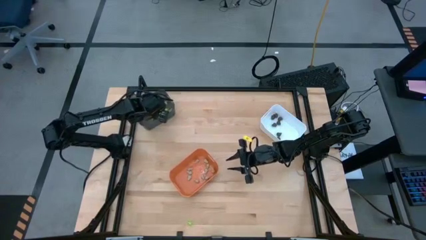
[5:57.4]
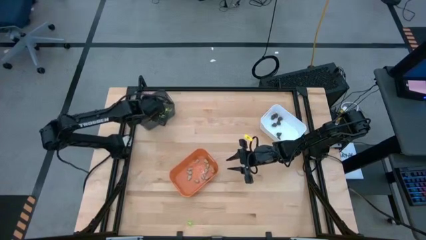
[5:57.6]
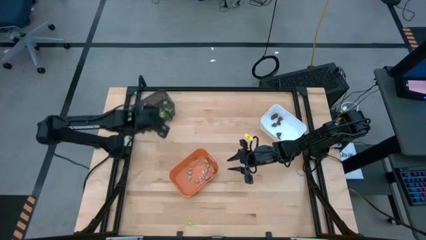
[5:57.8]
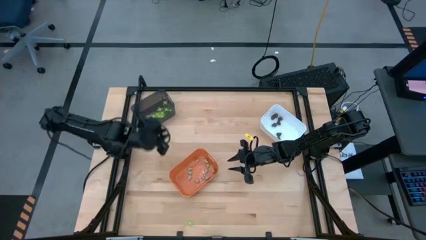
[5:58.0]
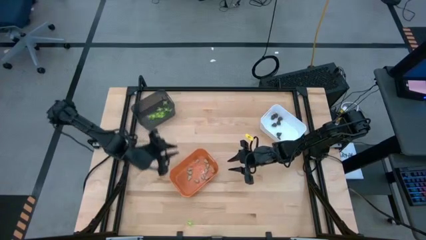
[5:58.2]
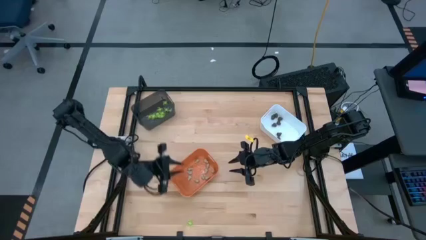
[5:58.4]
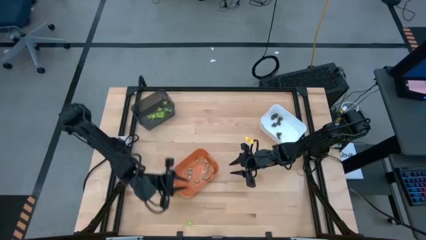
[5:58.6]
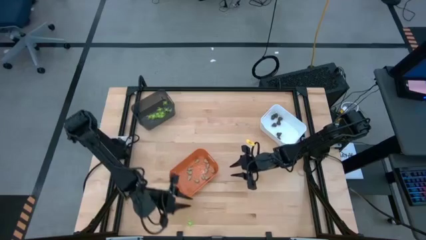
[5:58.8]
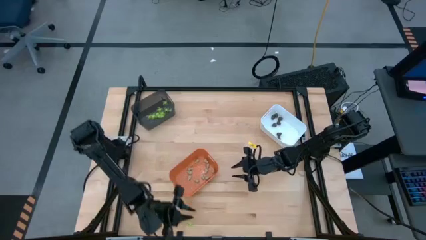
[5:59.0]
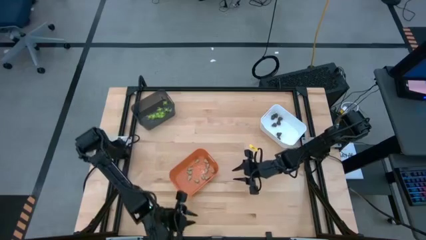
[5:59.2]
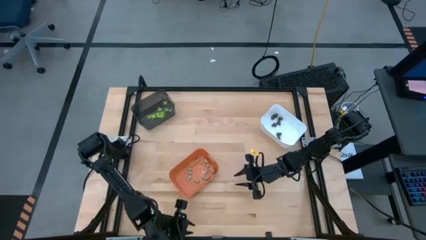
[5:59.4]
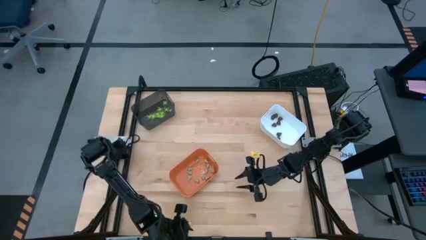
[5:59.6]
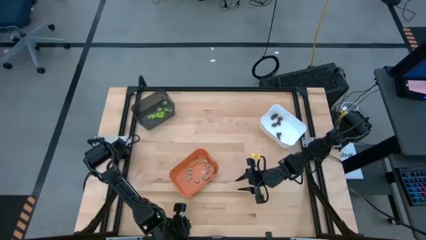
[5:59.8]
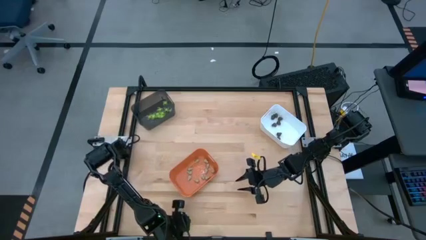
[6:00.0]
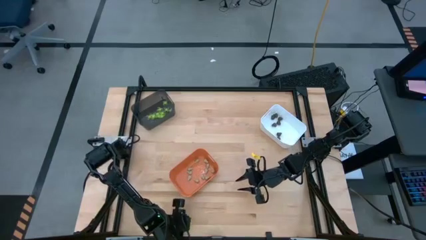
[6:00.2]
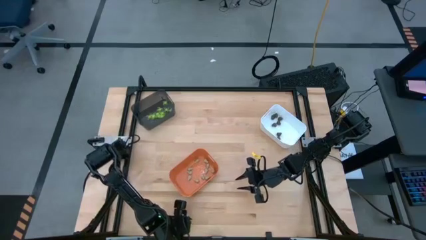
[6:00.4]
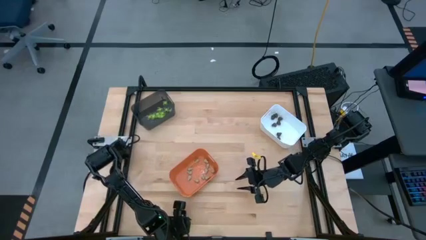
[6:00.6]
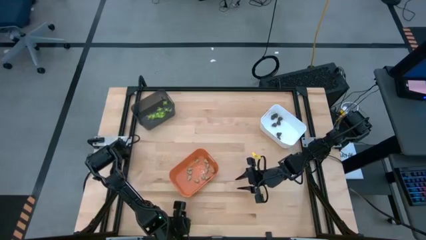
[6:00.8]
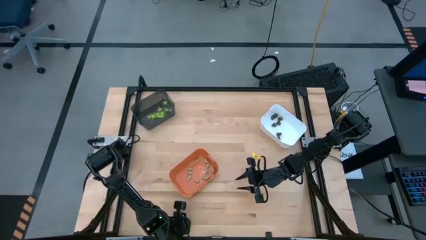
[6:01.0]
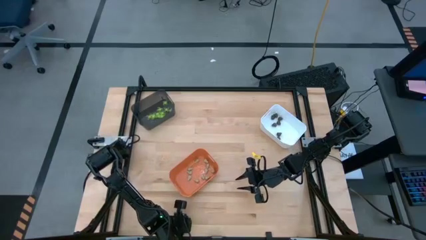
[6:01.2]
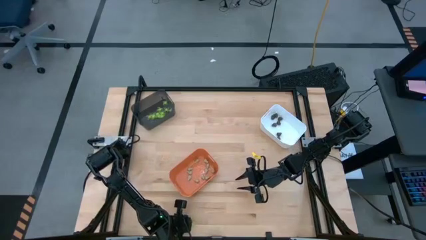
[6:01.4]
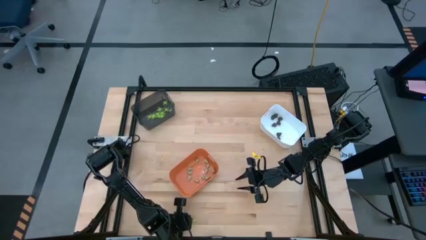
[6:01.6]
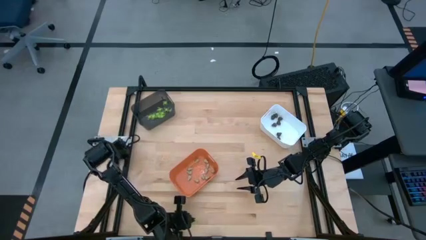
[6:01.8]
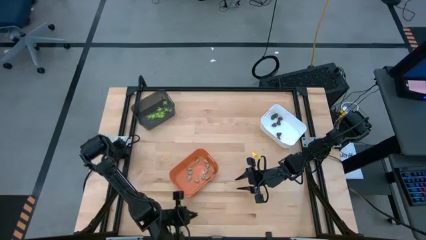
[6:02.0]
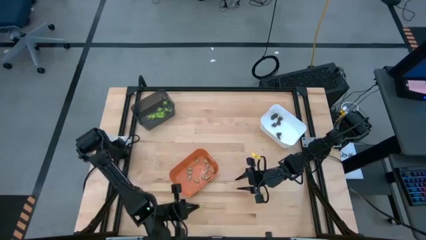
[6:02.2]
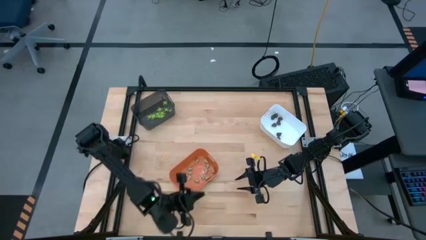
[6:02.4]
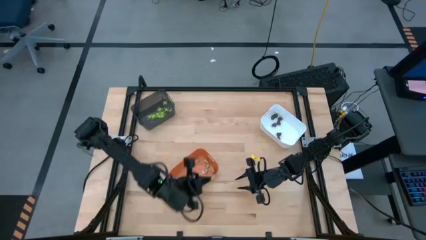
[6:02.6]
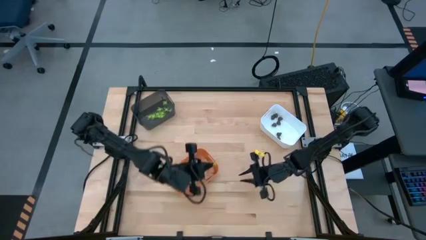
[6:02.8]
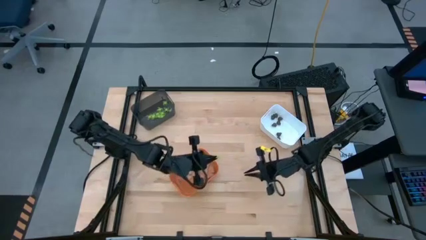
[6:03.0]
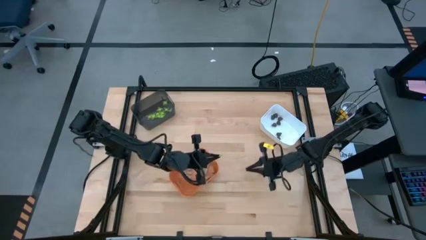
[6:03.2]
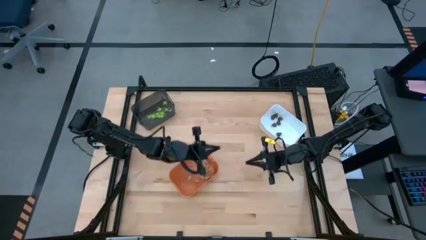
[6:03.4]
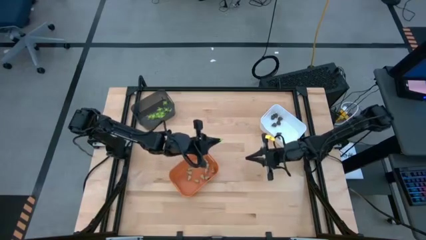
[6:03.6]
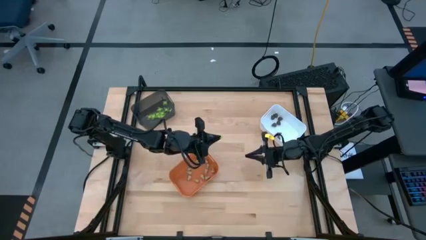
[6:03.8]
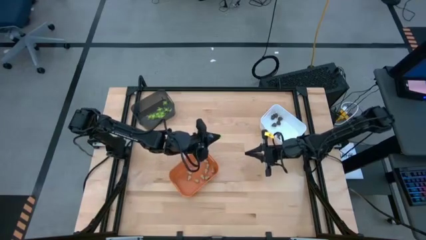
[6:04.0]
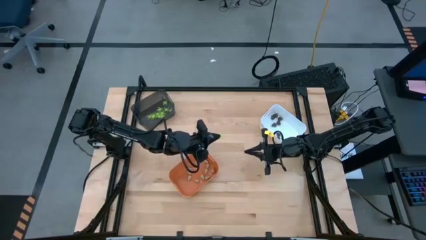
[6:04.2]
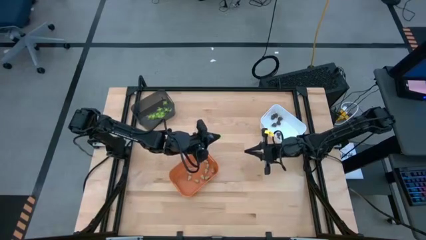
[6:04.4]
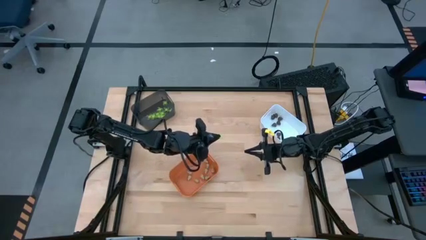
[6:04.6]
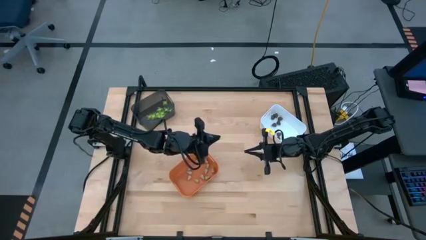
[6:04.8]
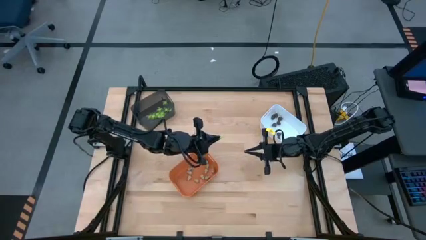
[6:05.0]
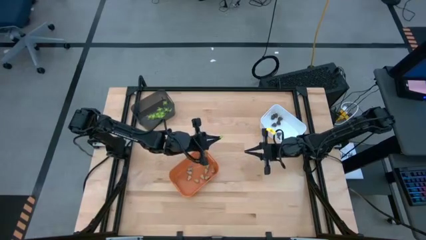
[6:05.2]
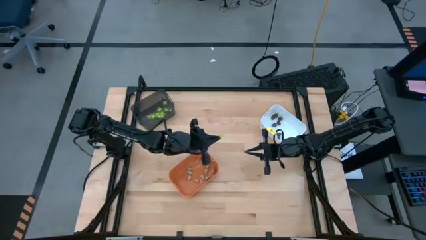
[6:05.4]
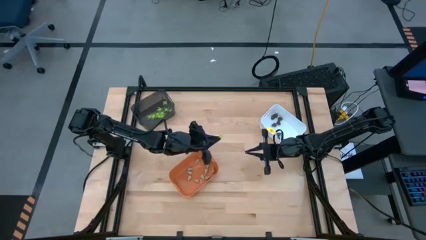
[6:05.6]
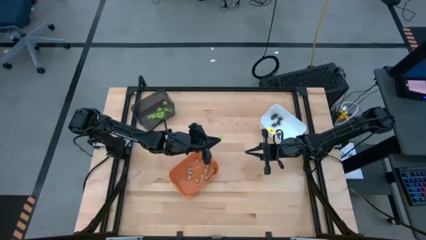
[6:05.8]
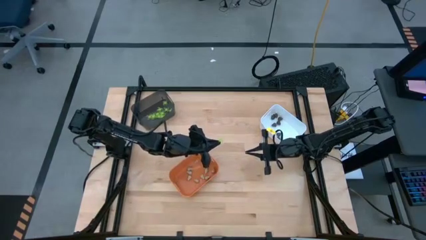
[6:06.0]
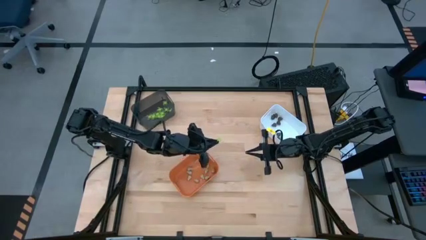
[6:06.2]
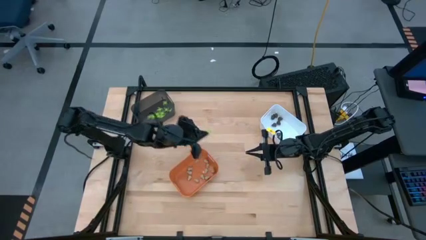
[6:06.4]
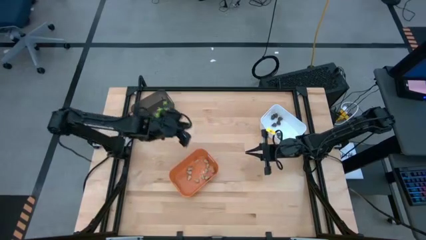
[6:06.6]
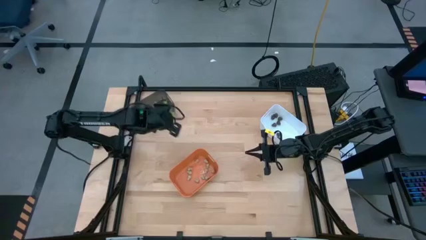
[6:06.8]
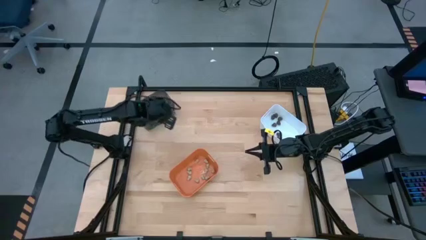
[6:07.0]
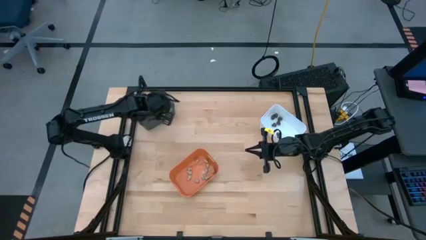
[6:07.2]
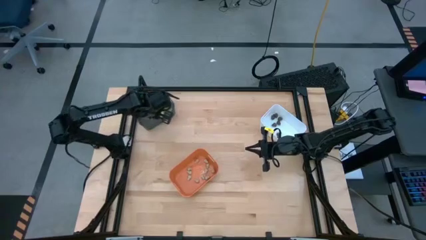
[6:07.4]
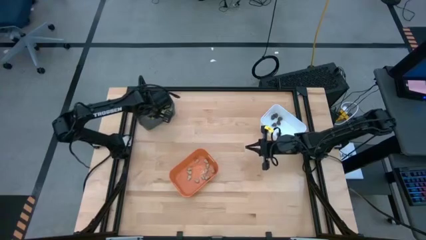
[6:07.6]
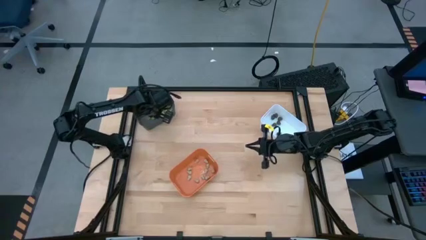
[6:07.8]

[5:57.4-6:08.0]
Task: Sort Halloween decoration
Put the green spider toy into the black bin
